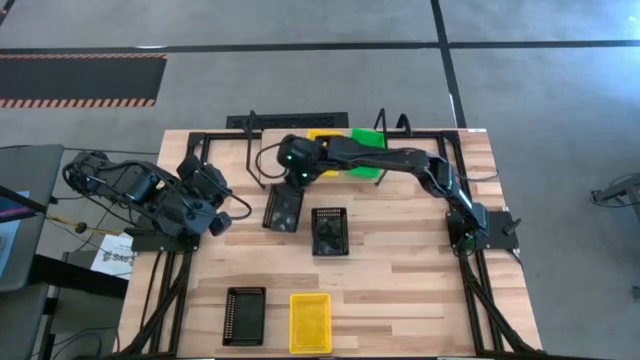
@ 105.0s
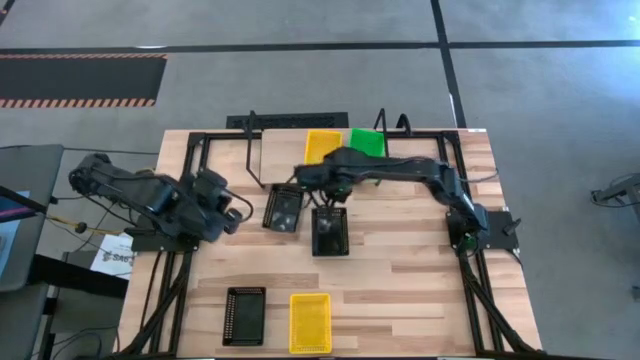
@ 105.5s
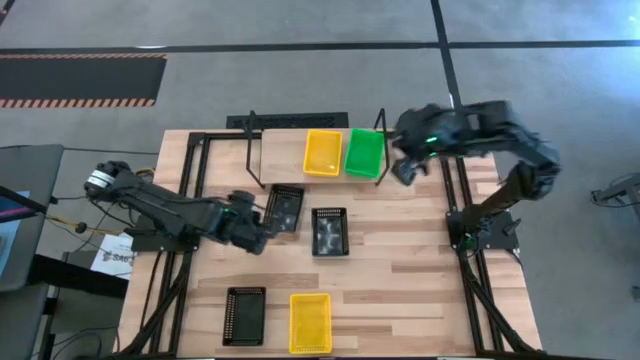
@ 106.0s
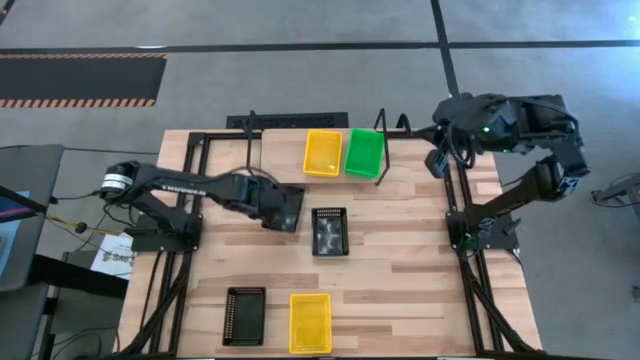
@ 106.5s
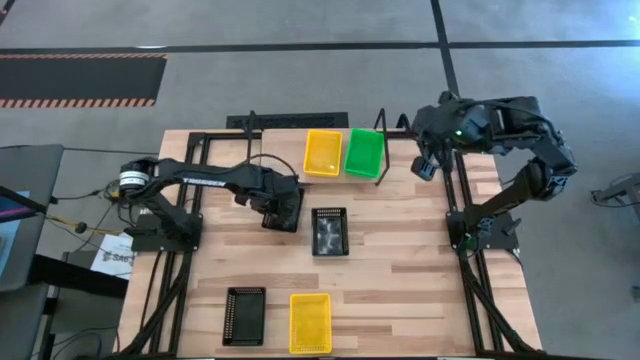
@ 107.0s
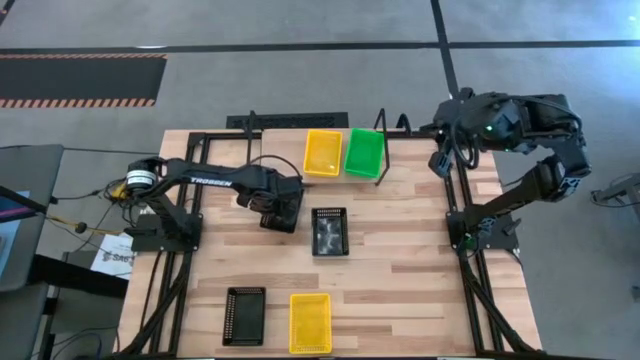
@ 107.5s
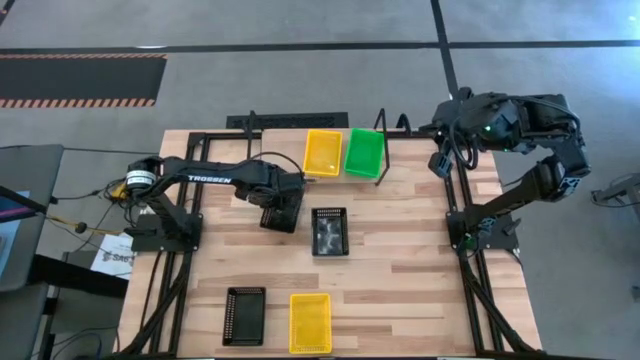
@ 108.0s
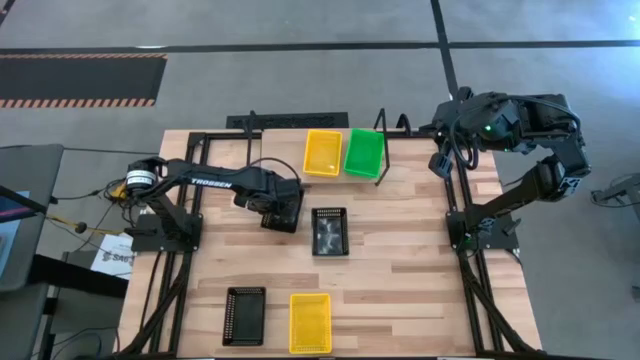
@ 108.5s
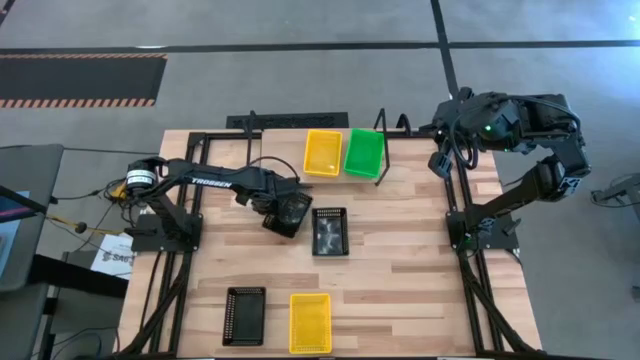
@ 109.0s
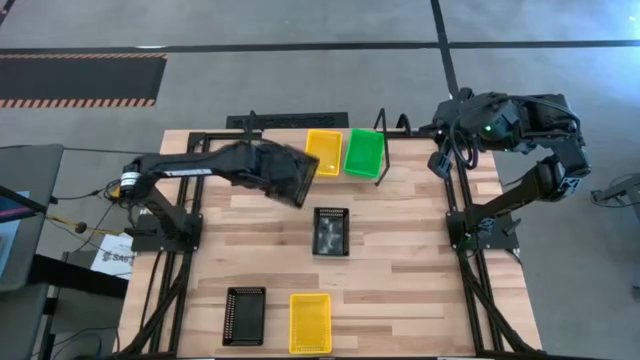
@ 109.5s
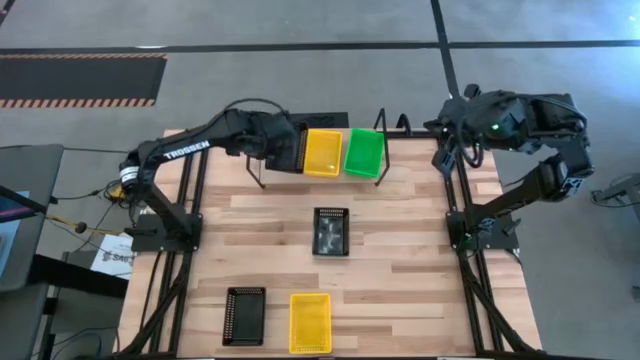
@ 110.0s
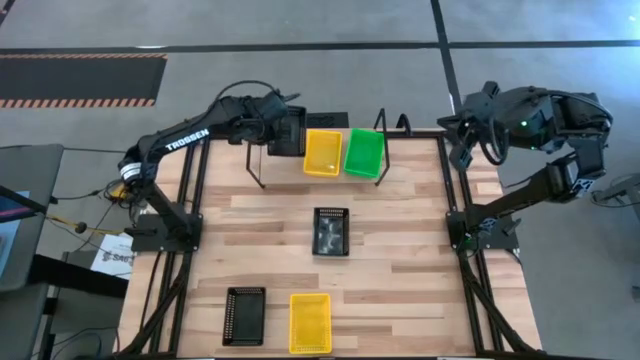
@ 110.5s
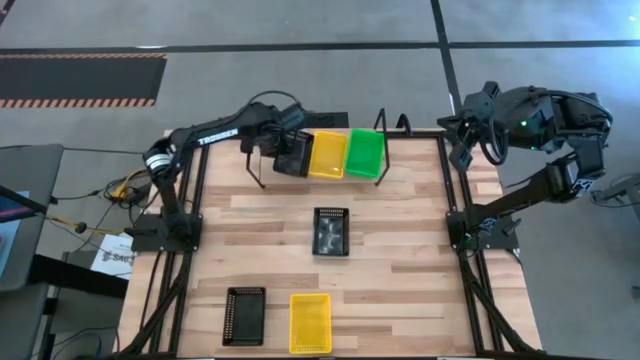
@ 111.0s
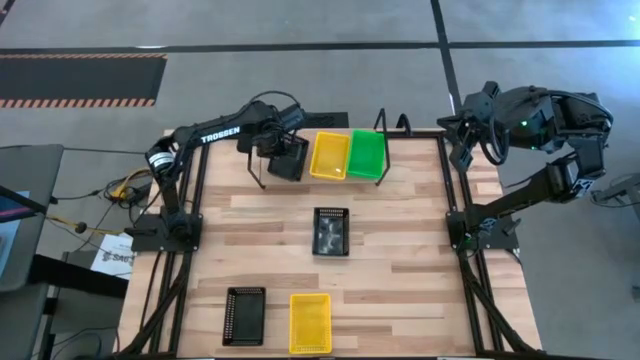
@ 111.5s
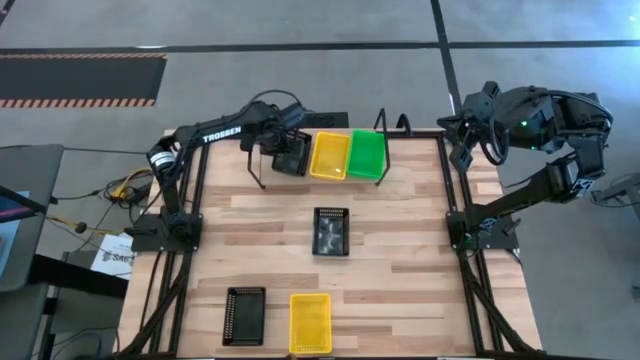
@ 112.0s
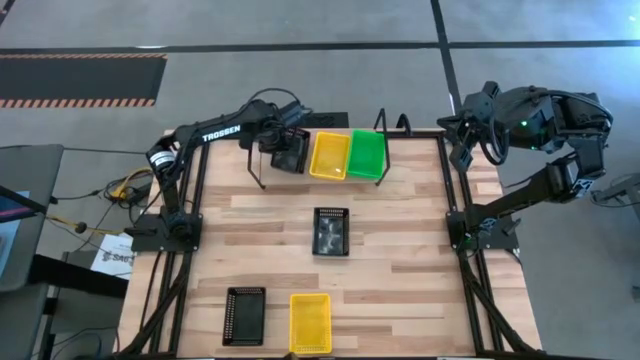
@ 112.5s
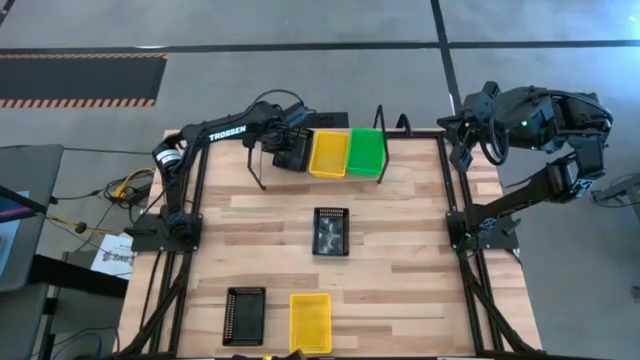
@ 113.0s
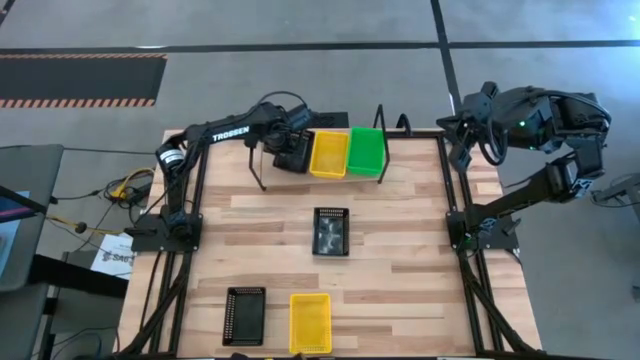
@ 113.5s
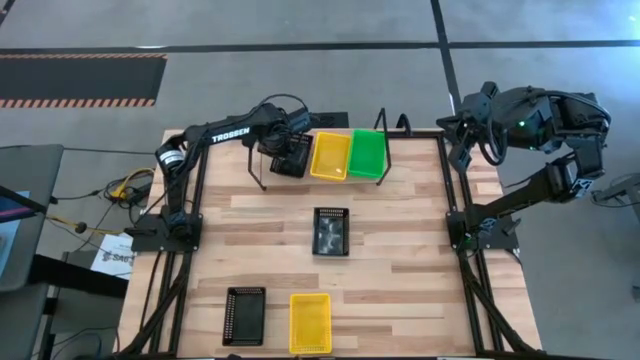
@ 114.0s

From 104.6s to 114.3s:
Task: Stack baskets on shelf by color
Put the top black bin on the shelf

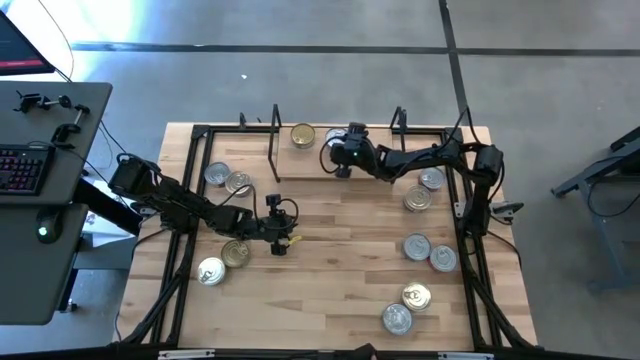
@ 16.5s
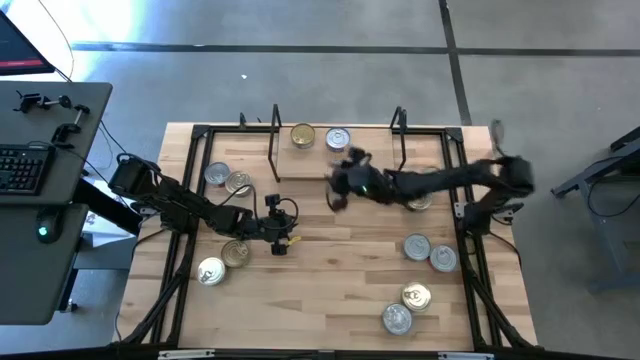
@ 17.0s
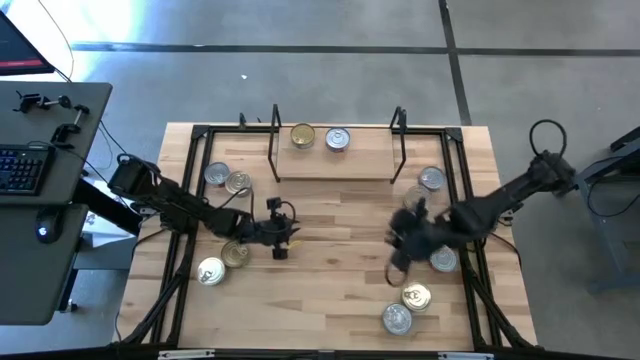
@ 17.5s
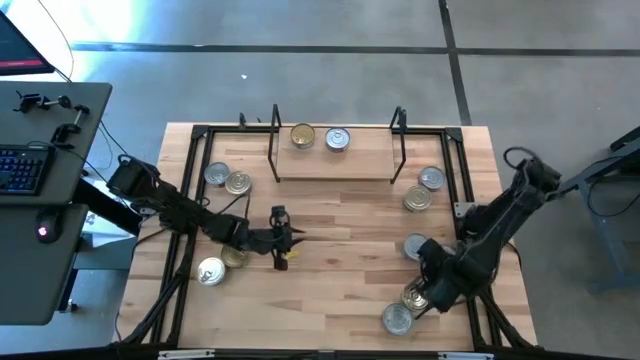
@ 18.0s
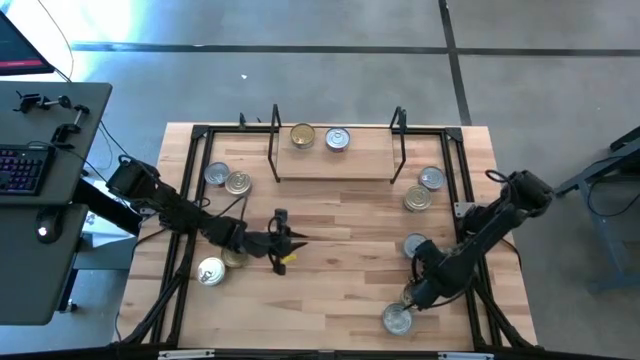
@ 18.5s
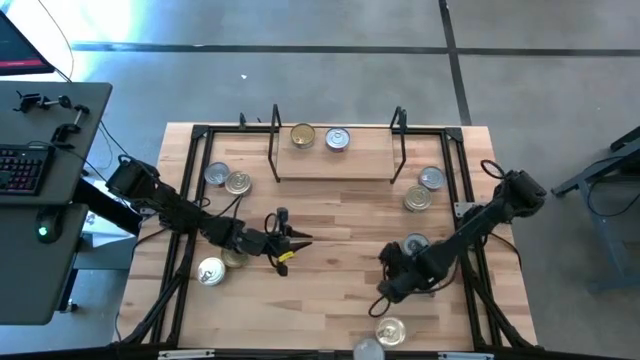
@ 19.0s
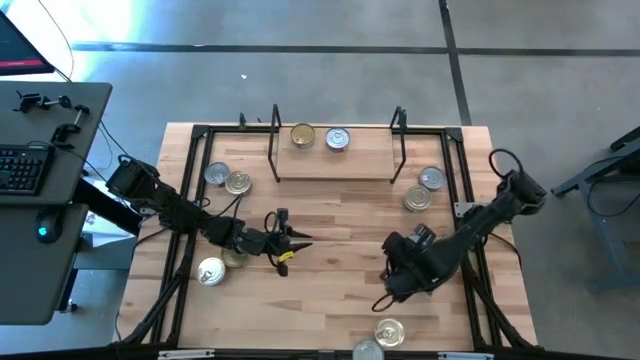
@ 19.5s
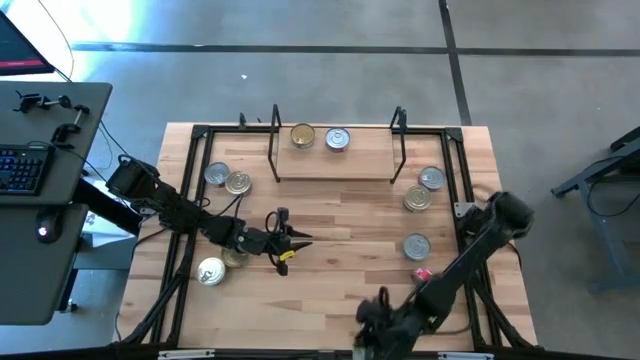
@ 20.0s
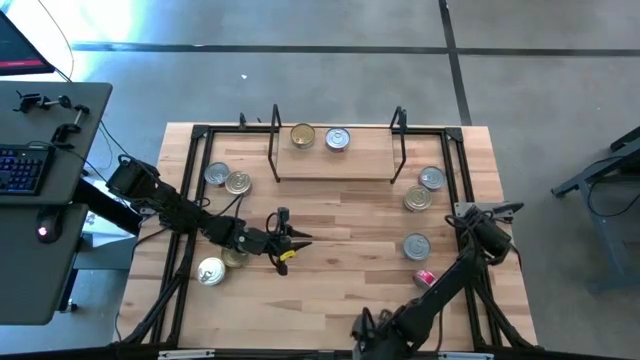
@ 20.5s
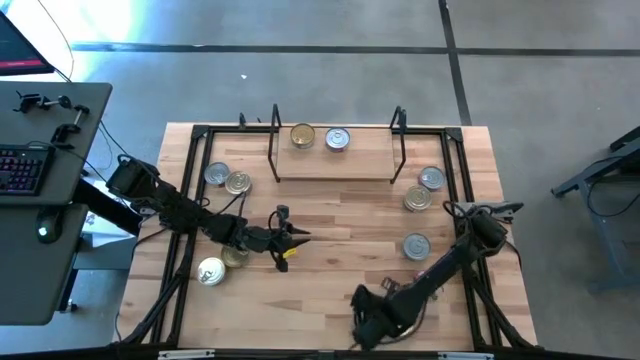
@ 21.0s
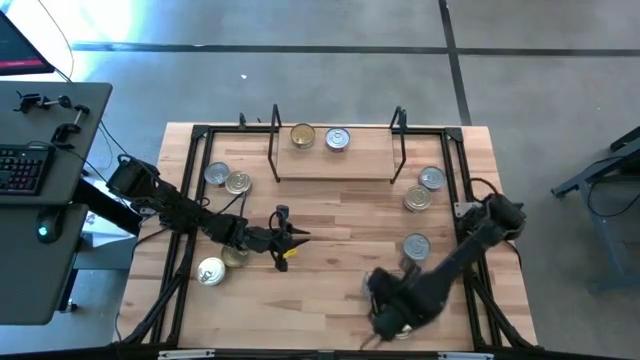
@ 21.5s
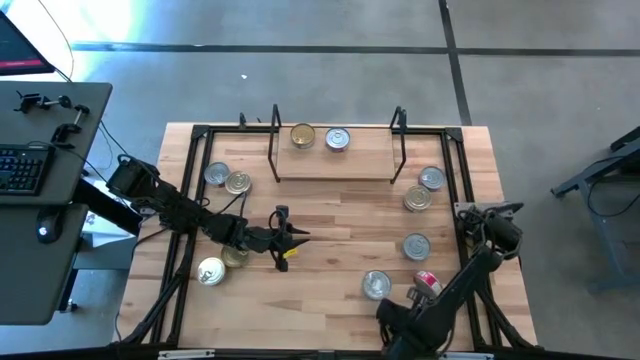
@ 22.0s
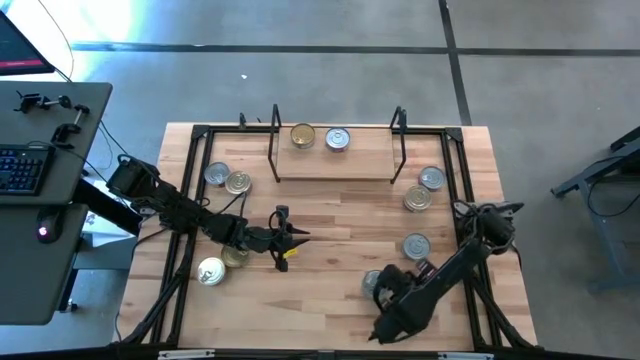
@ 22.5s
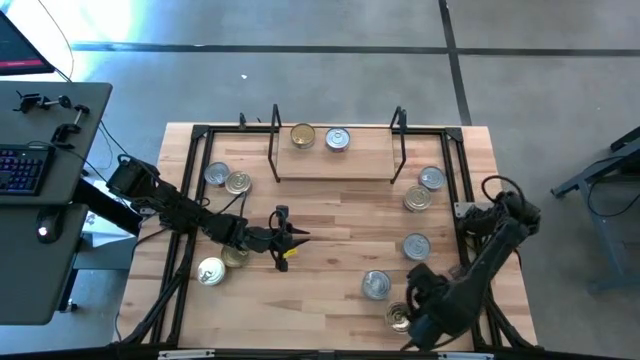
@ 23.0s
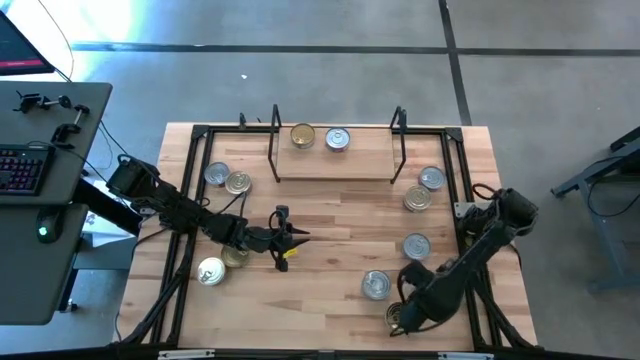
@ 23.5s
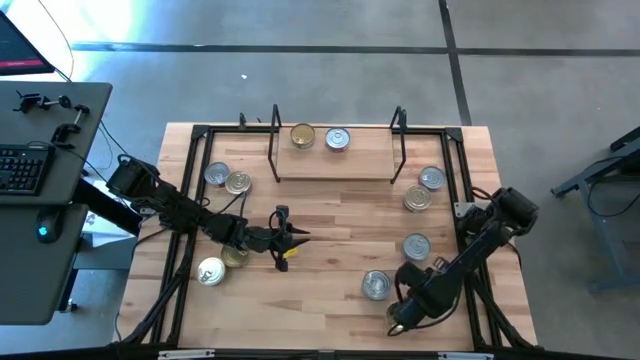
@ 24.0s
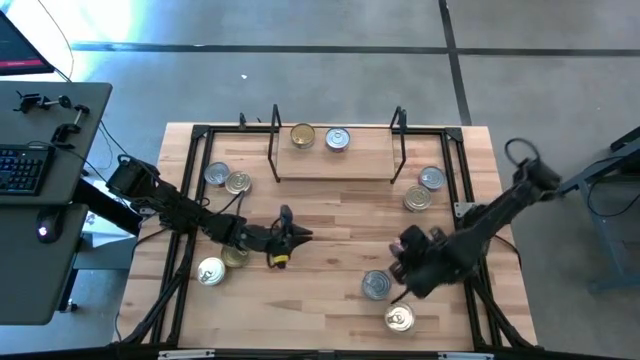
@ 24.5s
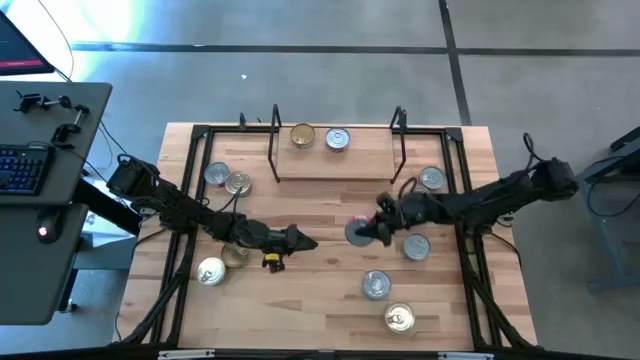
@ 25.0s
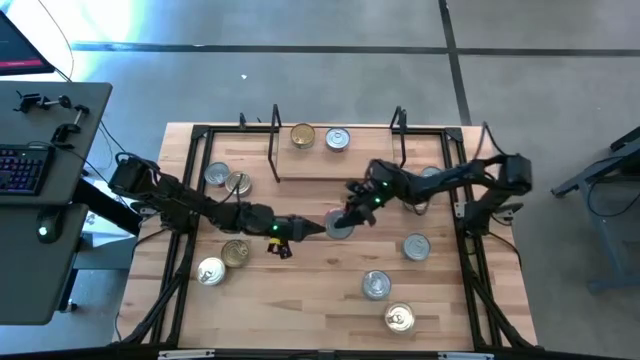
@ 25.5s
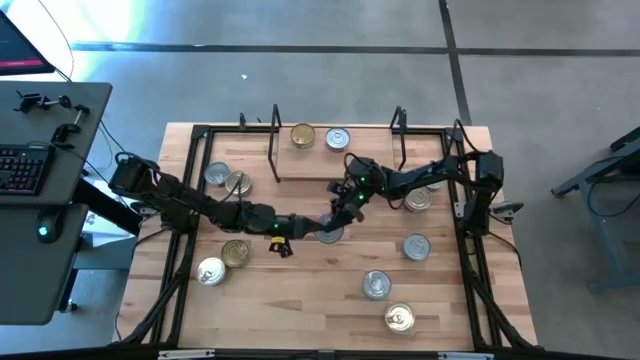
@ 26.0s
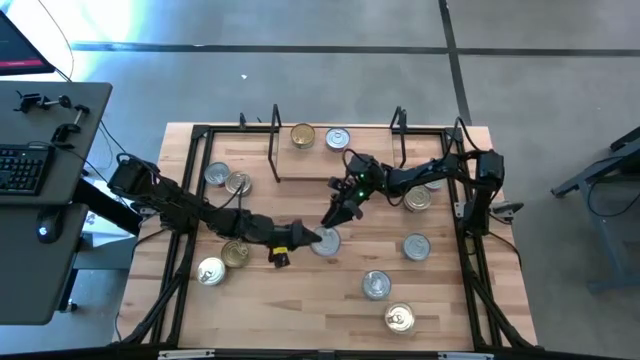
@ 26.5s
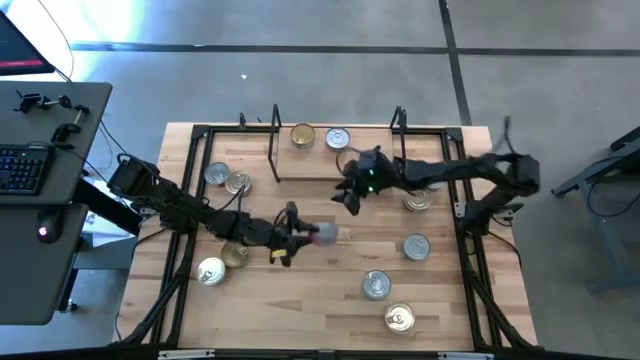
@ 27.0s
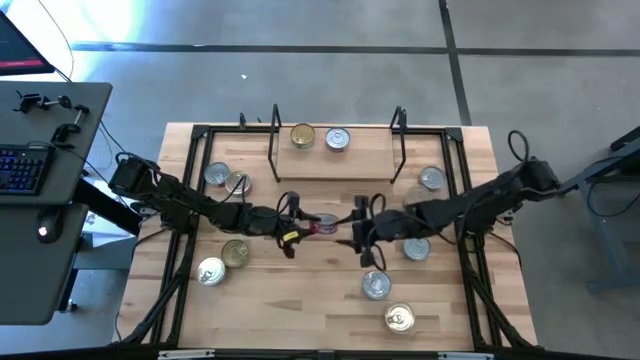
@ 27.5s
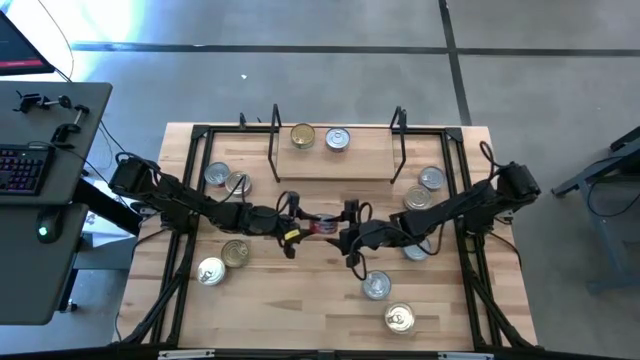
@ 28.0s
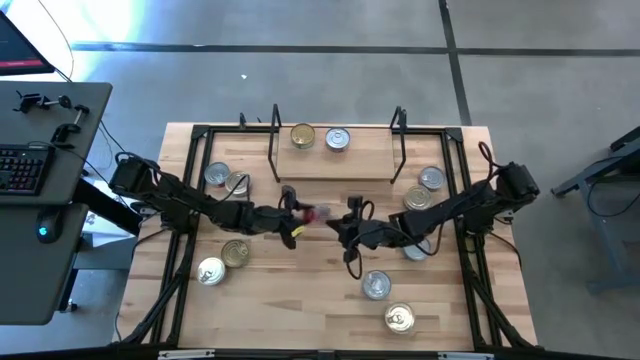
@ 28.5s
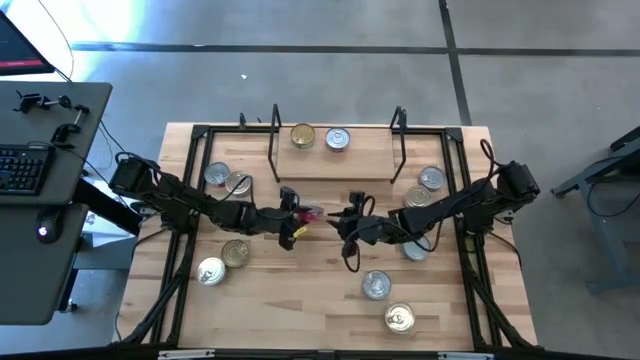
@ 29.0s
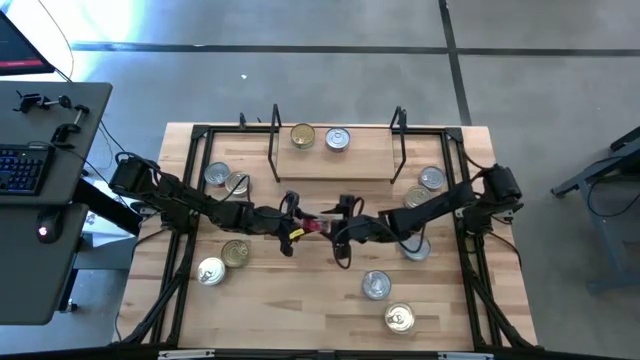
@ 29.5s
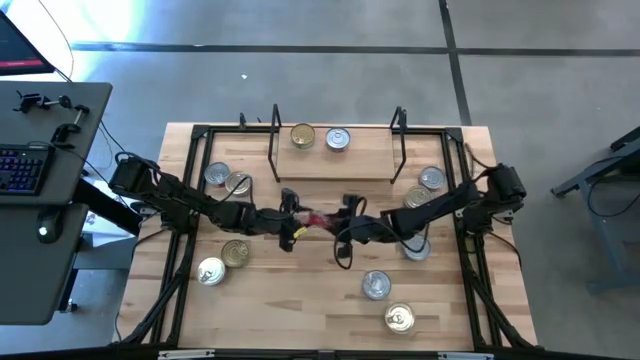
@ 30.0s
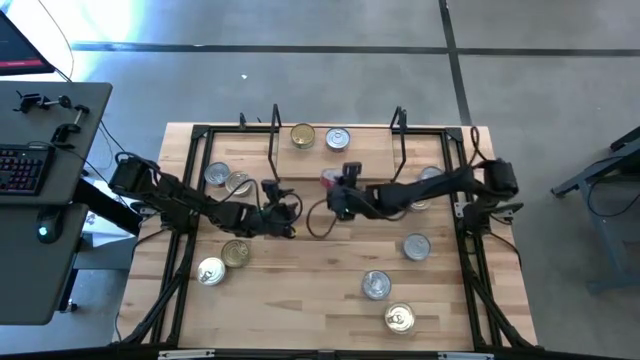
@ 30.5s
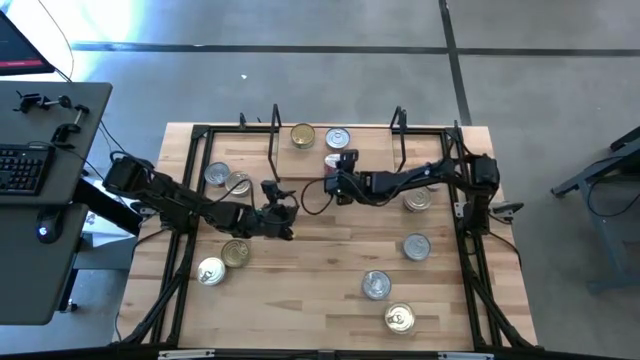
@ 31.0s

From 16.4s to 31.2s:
Task: Stack canned seafood by type on shelf
Put the red tuna can and align with the other red tuna can on the shelf
